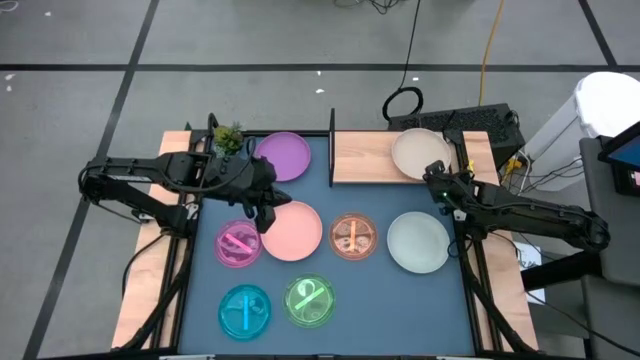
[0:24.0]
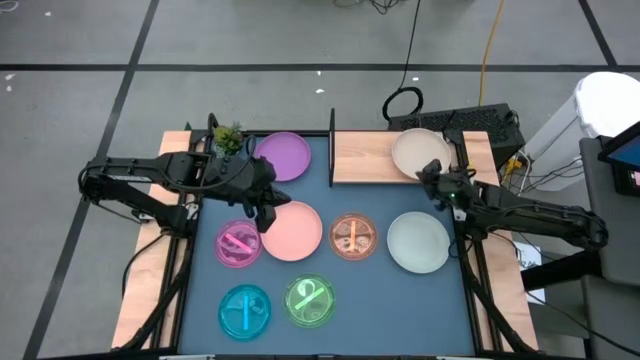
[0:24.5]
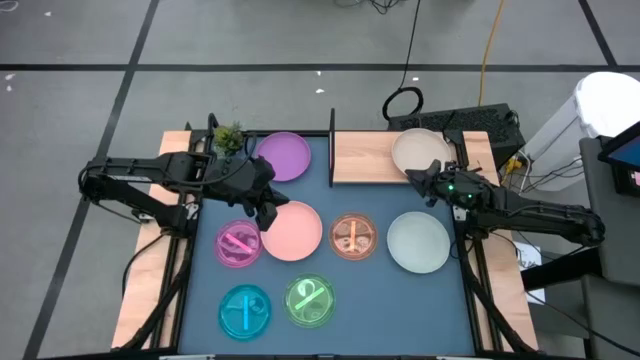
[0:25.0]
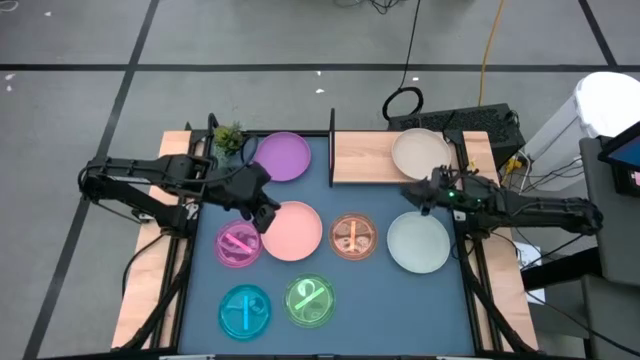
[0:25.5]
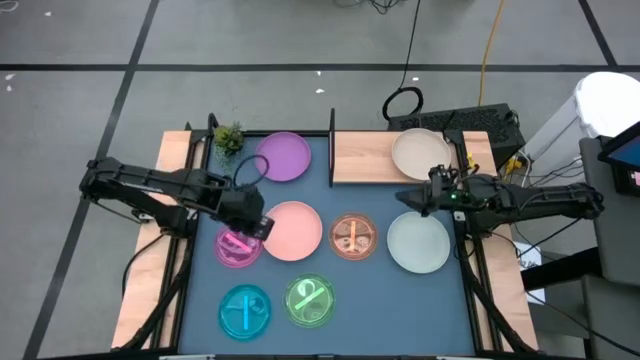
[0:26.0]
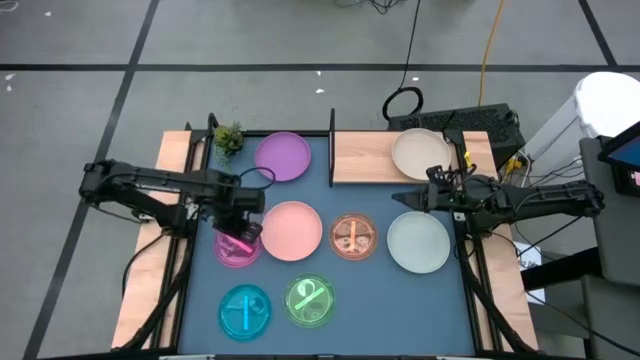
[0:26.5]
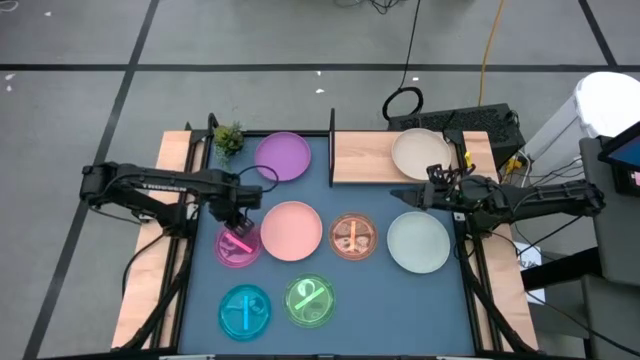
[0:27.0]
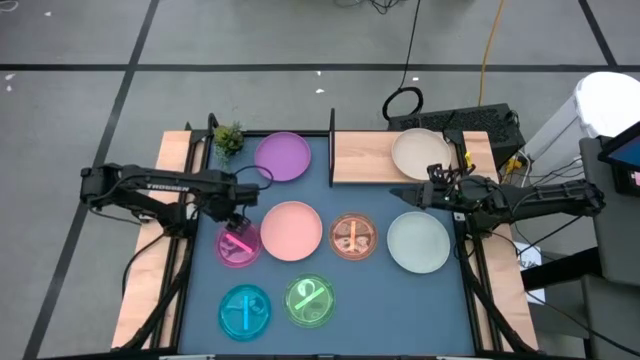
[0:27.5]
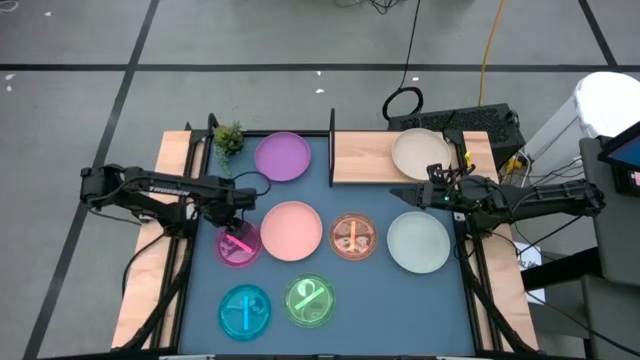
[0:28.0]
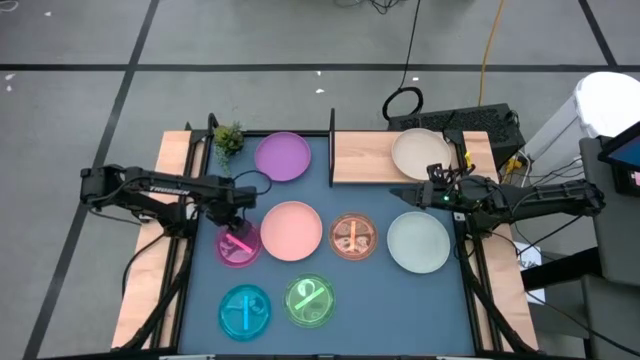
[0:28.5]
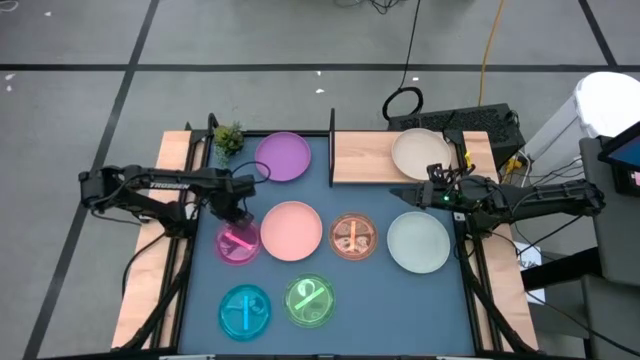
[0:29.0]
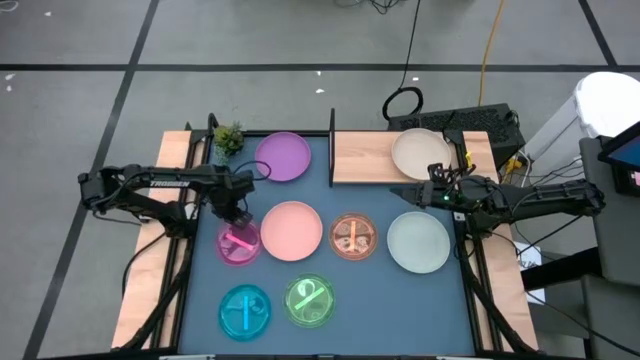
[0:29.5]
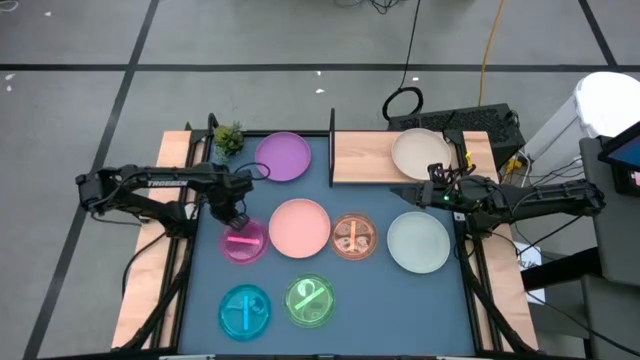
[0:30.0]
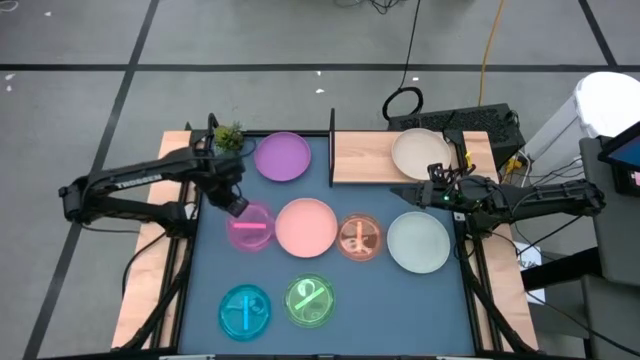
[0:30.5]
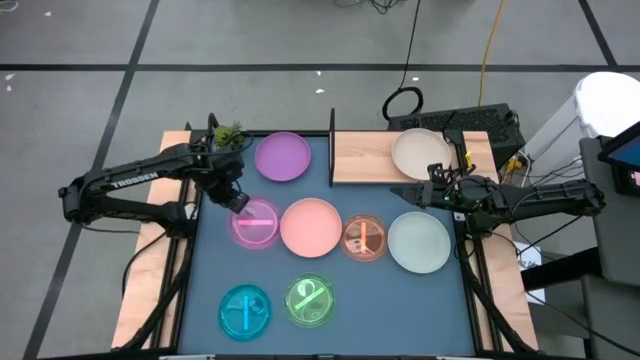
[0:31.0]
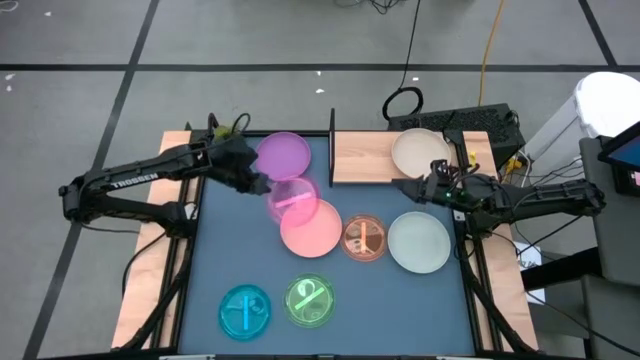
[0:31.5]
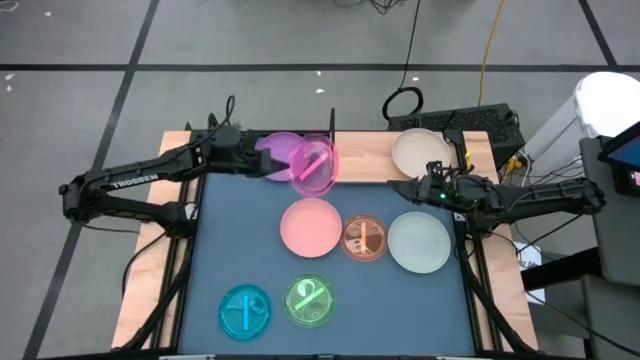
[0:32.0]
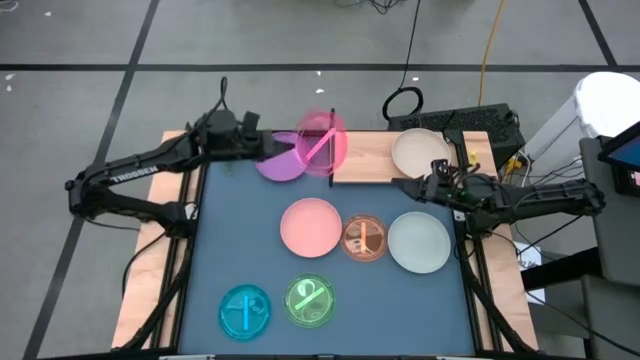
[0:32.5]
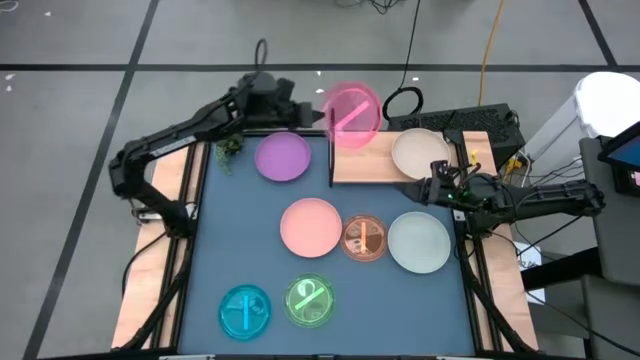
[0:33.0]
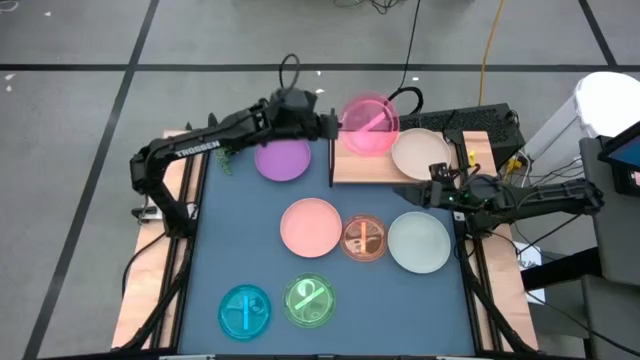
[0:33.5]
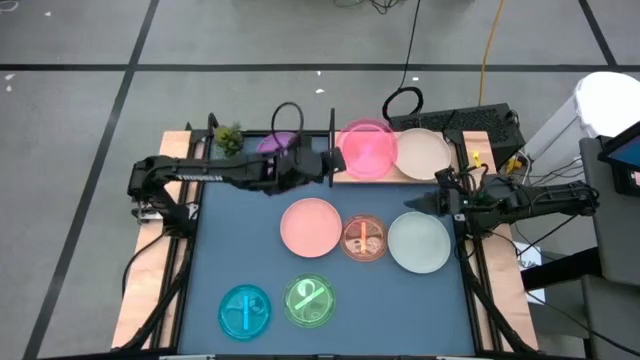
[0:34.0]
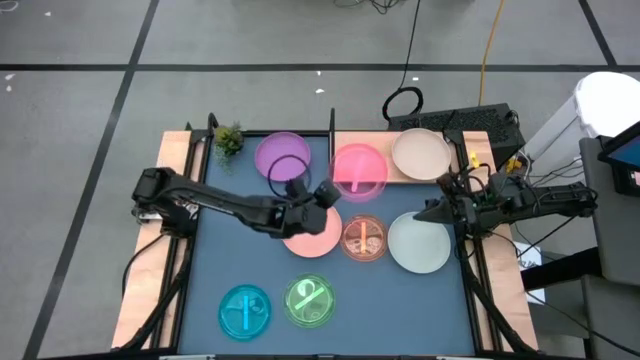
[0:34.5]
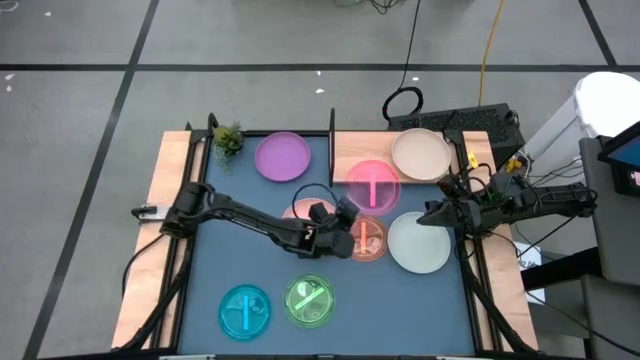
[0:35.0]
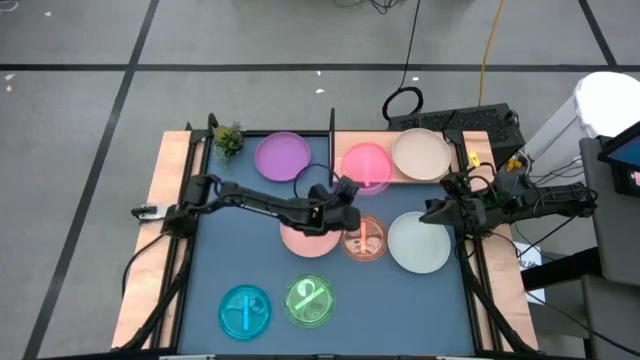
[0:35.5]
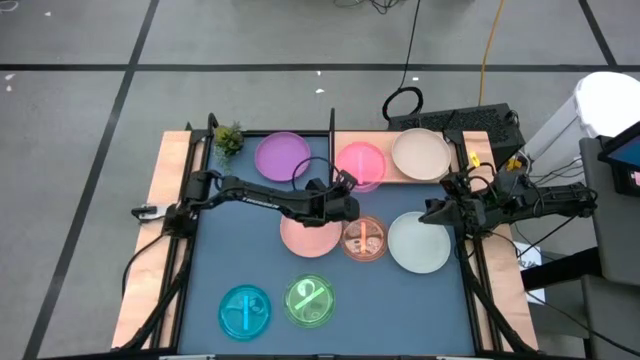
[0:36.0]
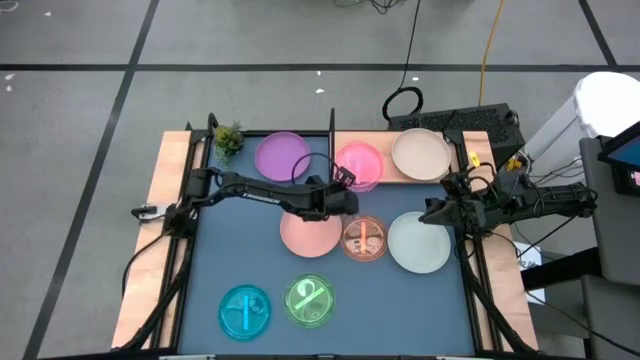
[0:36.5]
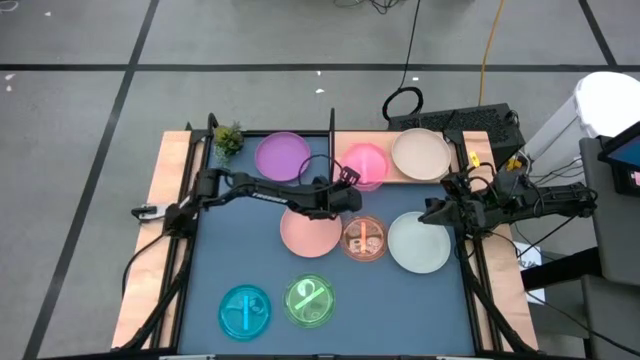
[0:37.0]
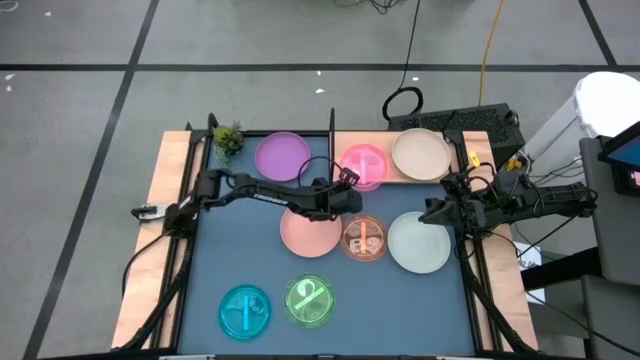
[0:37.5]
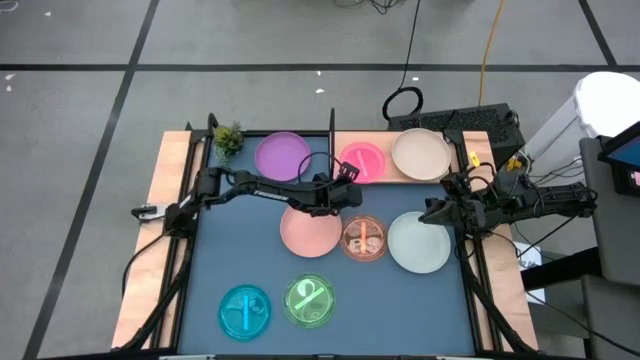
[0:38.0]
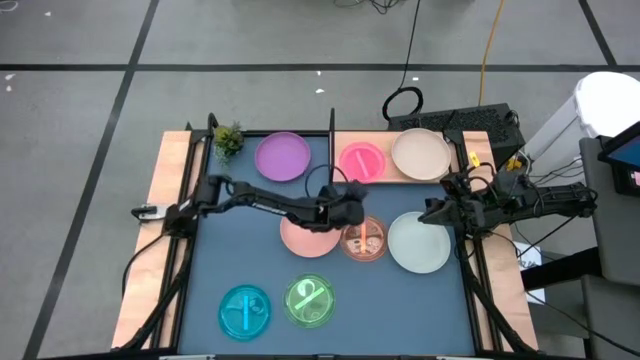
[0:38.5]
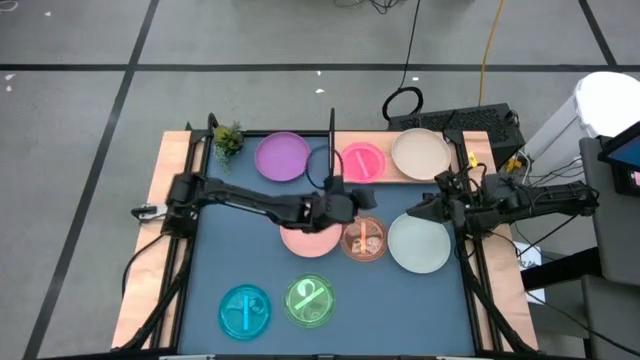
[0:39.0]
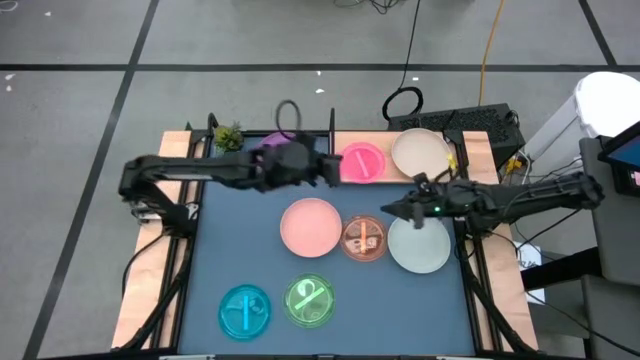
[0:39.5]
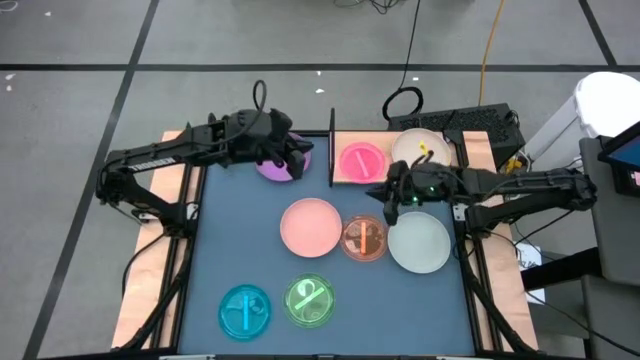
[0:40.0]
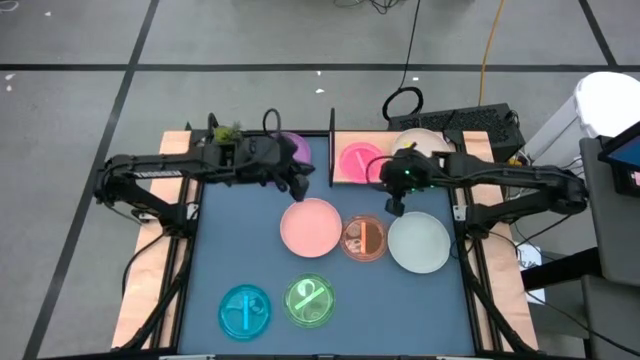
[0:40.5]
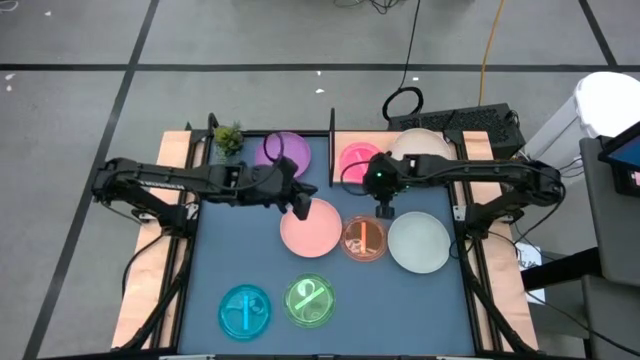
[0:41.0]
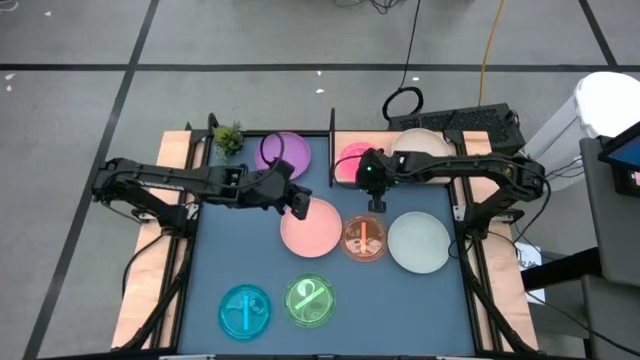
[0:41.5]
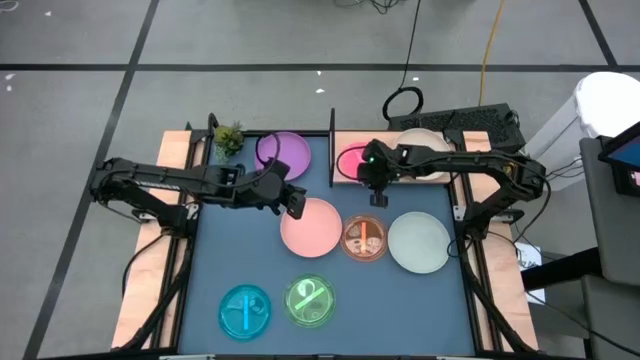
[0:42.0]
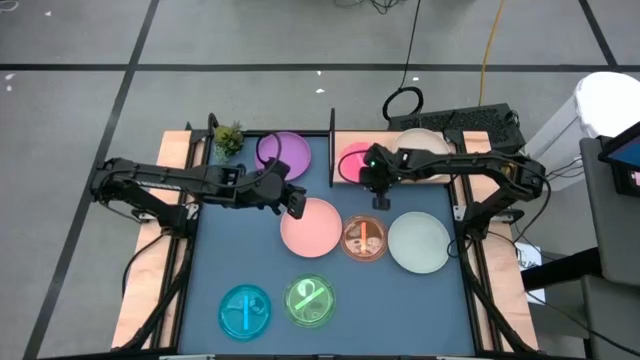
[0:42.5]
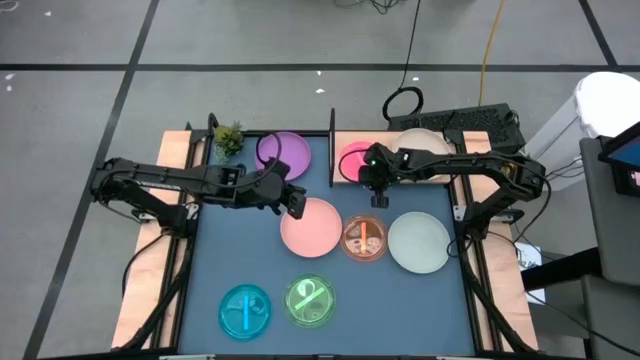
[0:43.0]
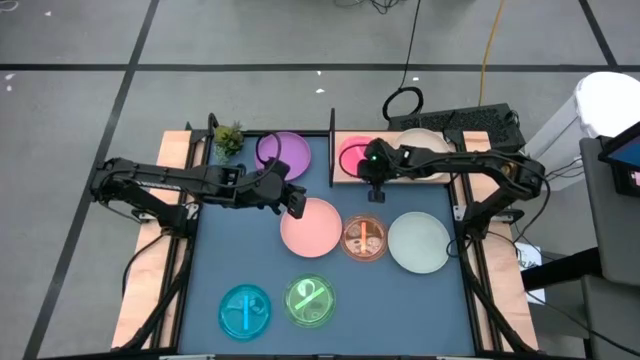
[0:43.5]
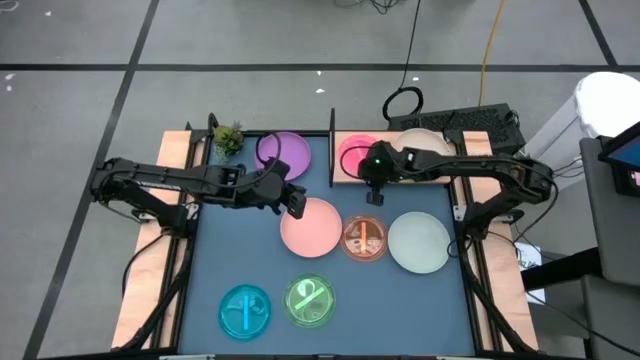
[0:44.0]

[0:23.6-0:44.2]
Task: Place and stack plates onto a shelf
Put the transparent pink plate on the shelf
